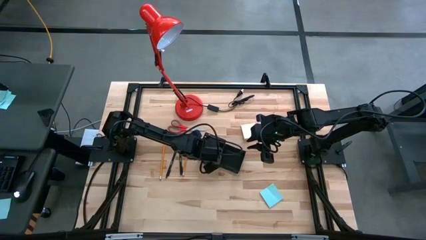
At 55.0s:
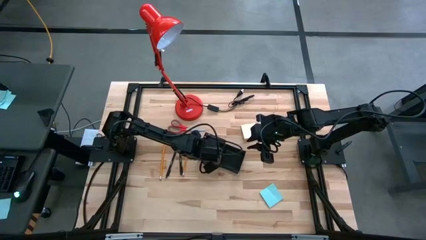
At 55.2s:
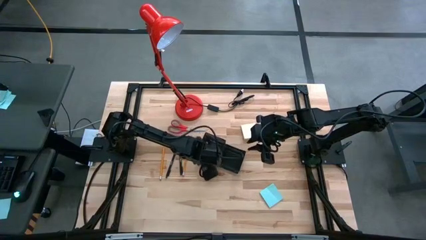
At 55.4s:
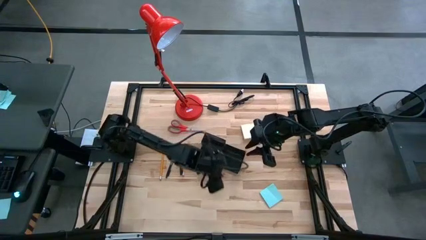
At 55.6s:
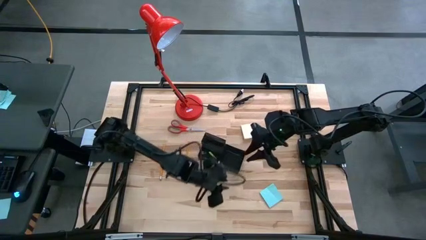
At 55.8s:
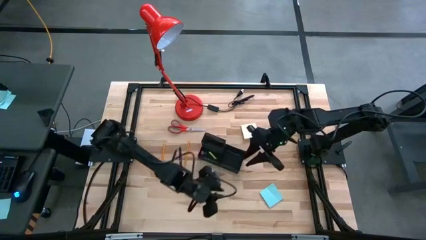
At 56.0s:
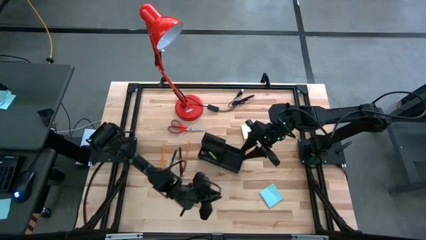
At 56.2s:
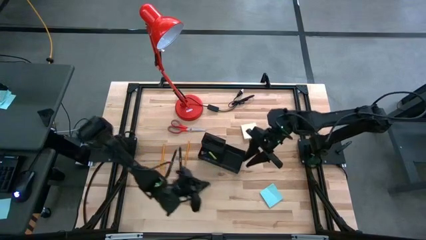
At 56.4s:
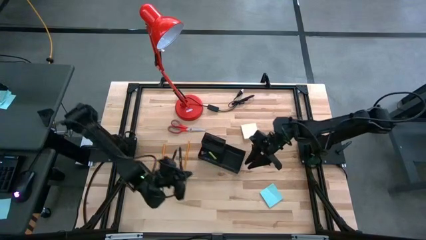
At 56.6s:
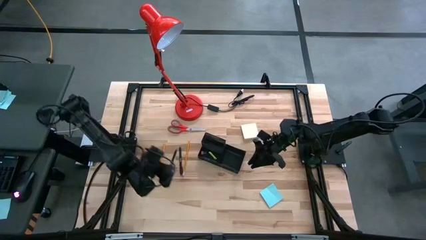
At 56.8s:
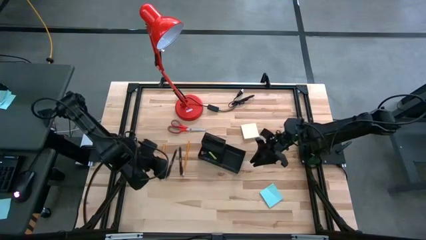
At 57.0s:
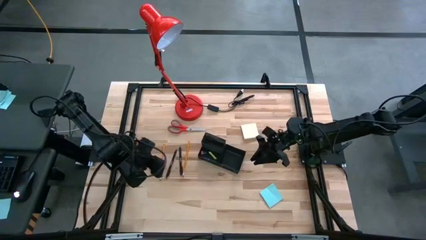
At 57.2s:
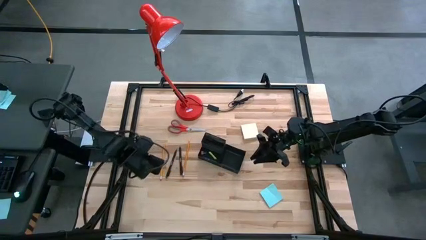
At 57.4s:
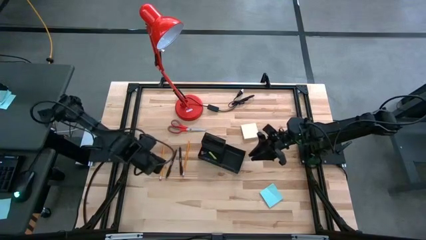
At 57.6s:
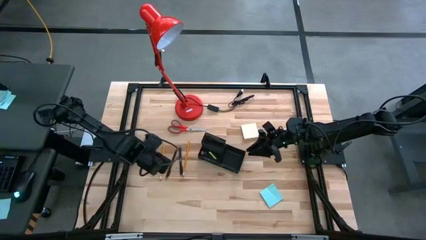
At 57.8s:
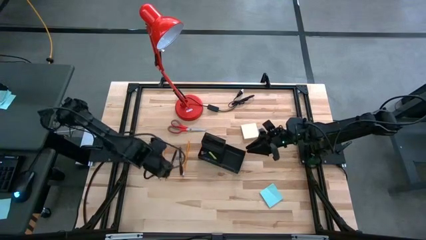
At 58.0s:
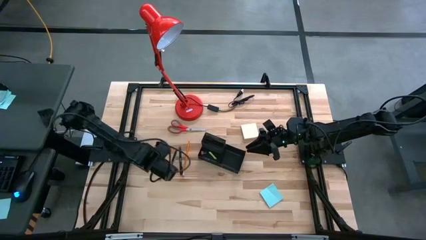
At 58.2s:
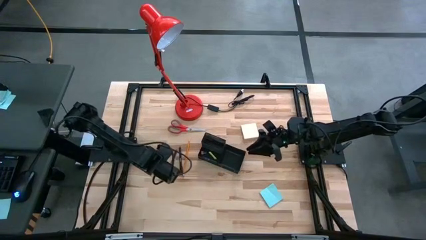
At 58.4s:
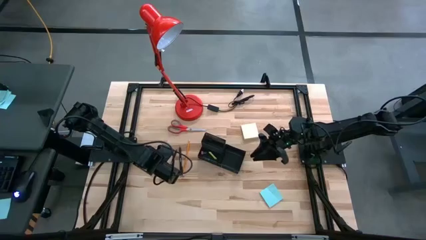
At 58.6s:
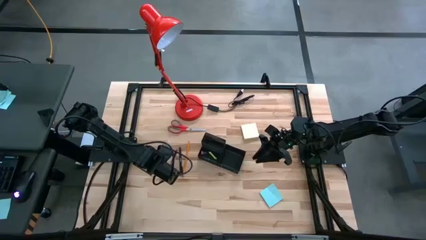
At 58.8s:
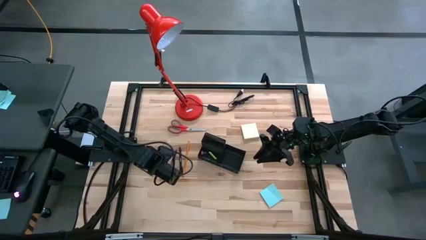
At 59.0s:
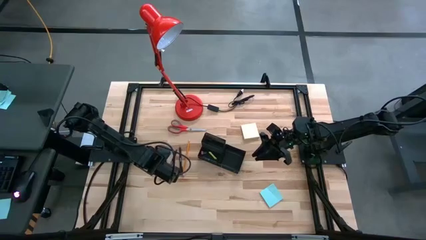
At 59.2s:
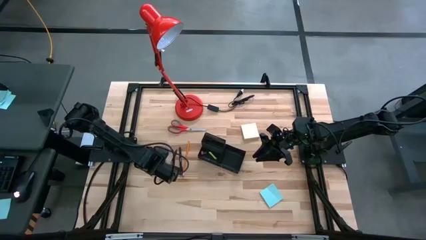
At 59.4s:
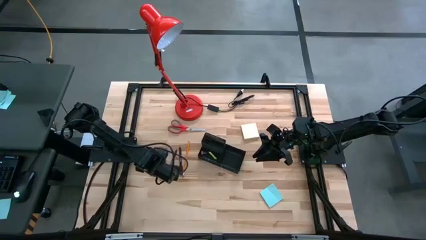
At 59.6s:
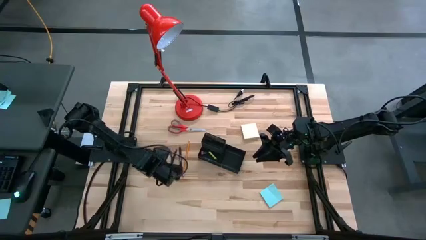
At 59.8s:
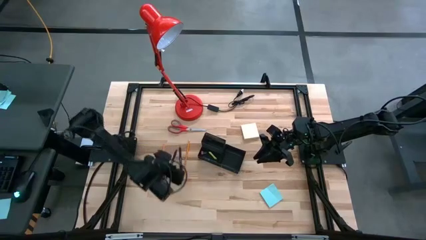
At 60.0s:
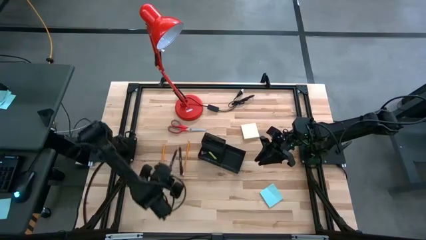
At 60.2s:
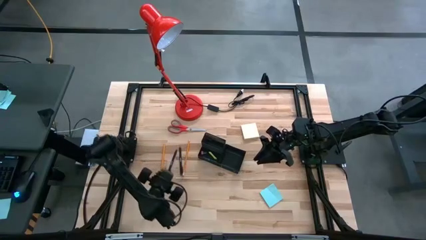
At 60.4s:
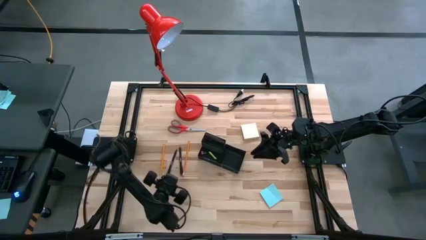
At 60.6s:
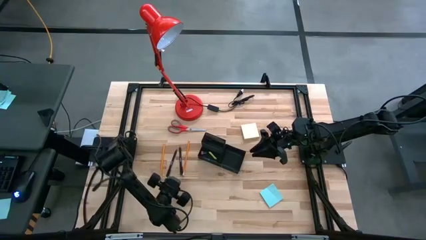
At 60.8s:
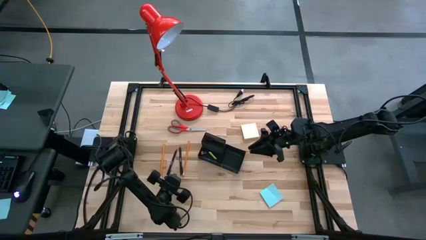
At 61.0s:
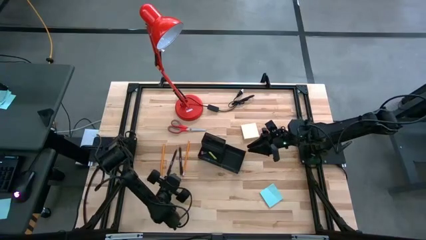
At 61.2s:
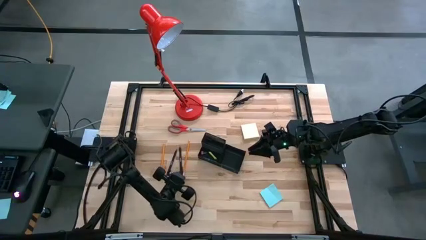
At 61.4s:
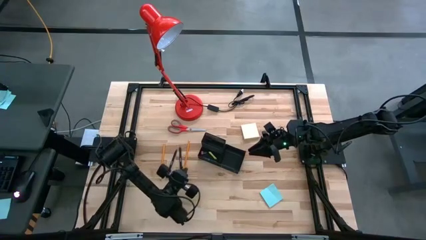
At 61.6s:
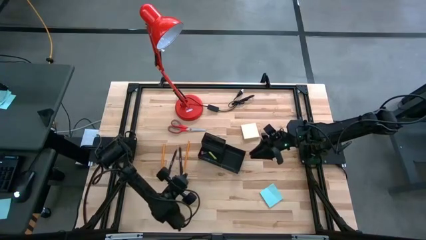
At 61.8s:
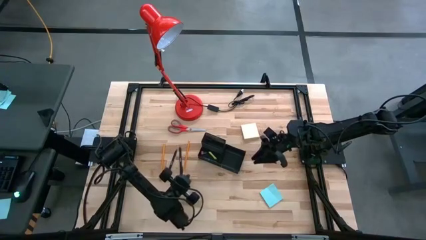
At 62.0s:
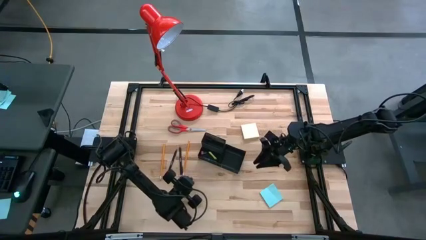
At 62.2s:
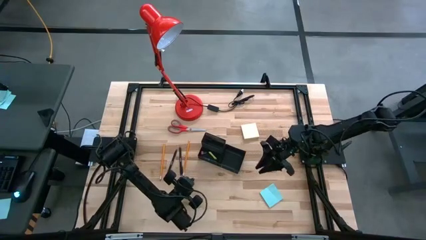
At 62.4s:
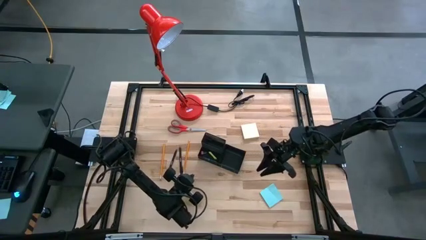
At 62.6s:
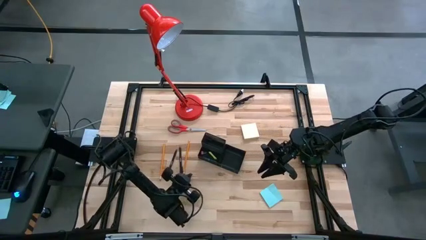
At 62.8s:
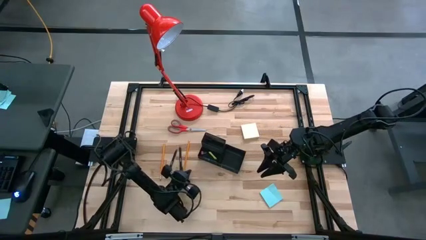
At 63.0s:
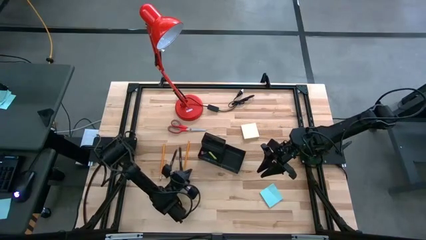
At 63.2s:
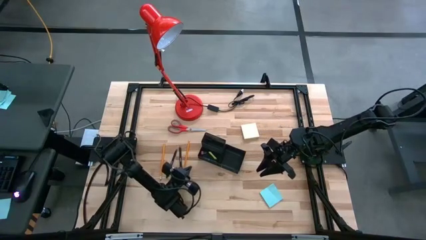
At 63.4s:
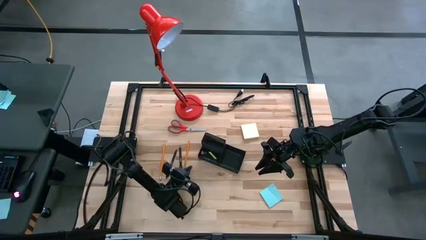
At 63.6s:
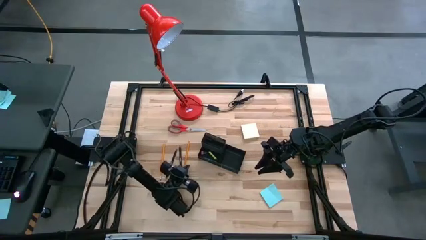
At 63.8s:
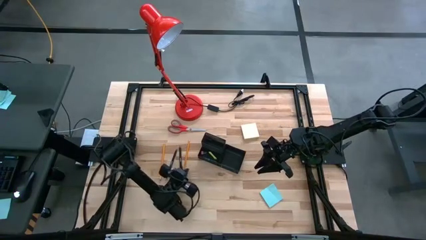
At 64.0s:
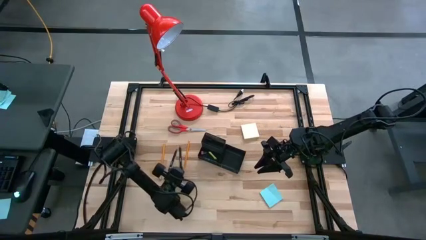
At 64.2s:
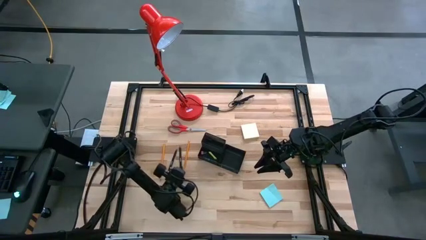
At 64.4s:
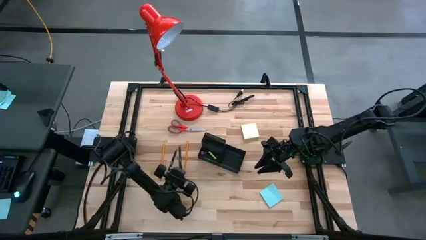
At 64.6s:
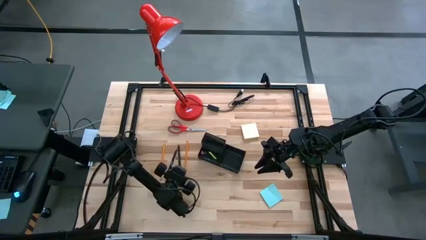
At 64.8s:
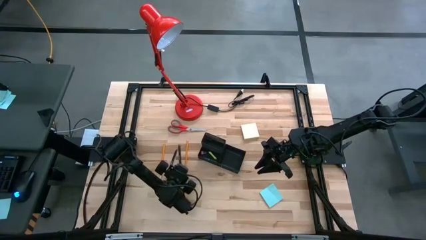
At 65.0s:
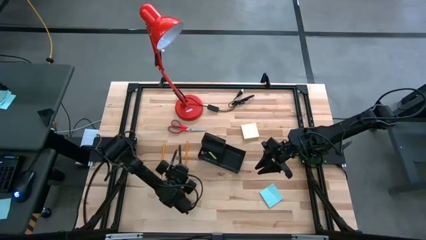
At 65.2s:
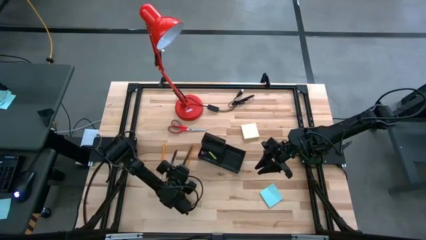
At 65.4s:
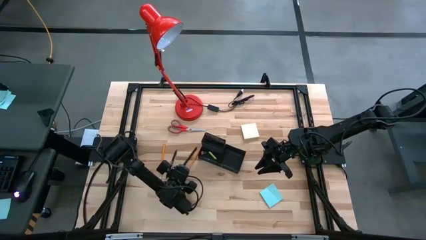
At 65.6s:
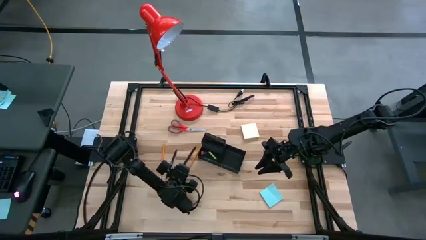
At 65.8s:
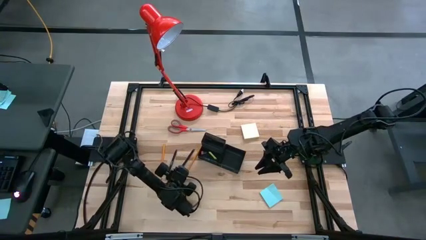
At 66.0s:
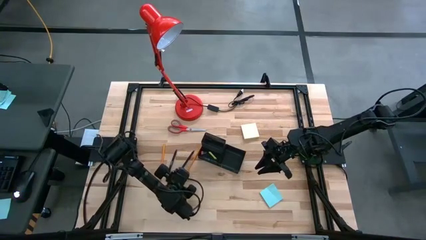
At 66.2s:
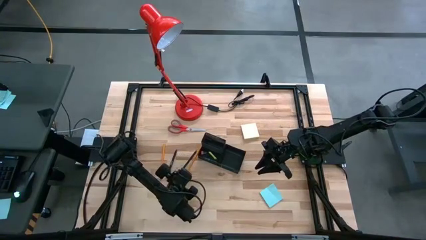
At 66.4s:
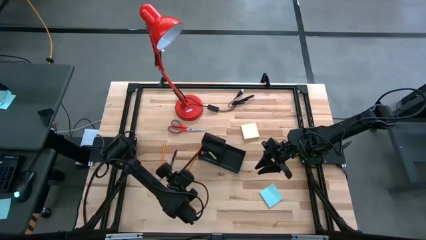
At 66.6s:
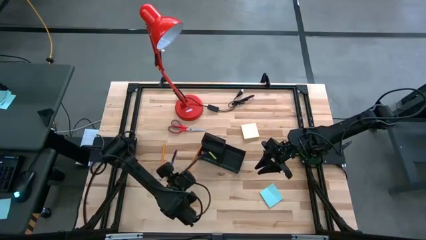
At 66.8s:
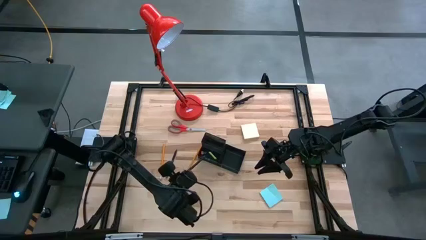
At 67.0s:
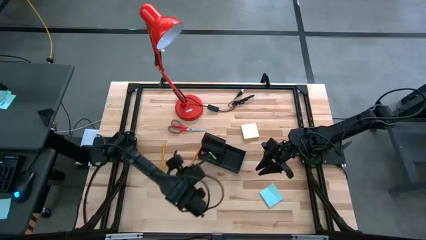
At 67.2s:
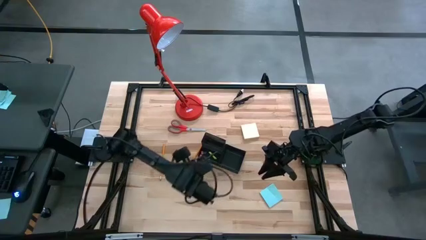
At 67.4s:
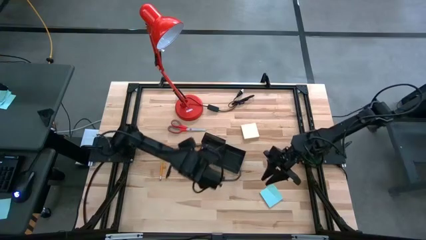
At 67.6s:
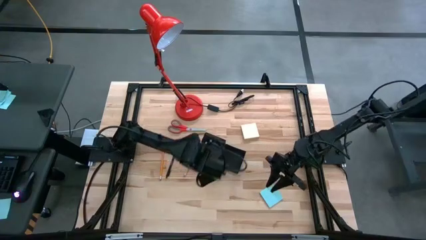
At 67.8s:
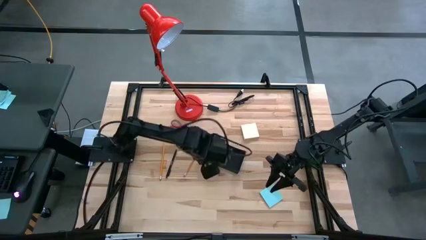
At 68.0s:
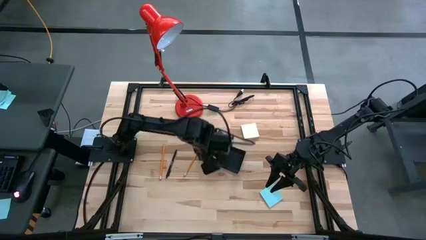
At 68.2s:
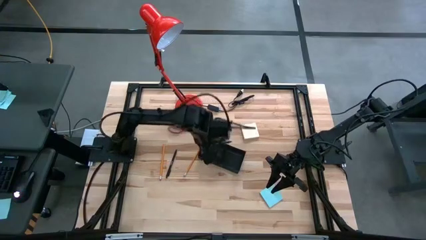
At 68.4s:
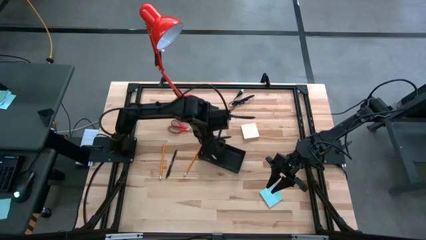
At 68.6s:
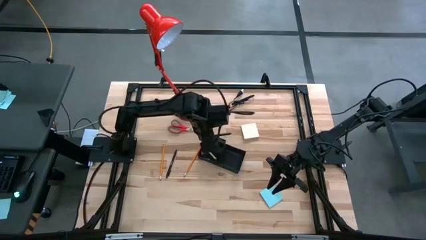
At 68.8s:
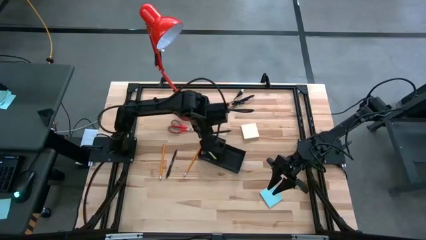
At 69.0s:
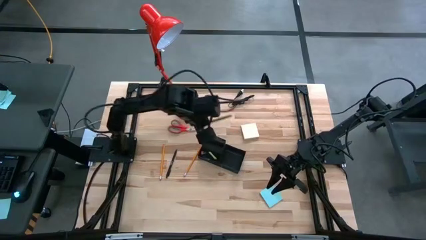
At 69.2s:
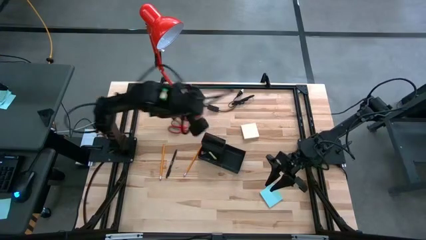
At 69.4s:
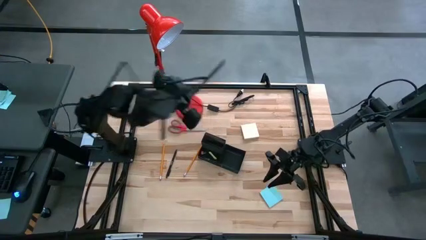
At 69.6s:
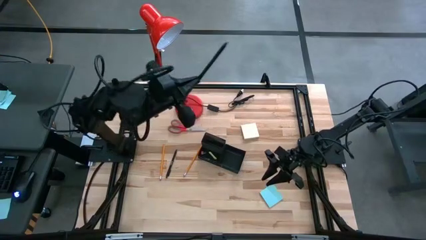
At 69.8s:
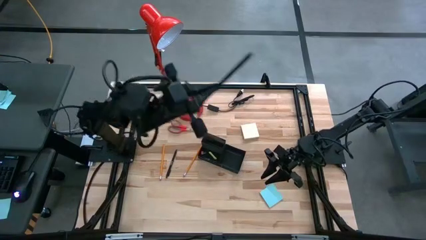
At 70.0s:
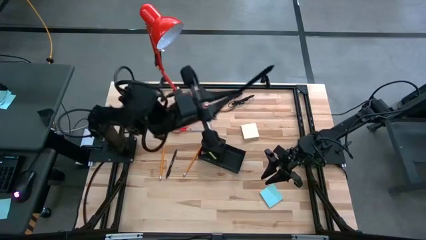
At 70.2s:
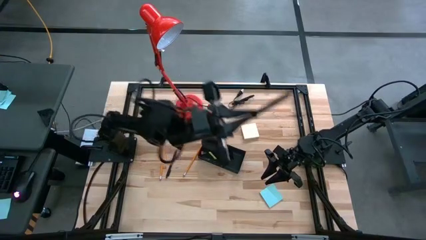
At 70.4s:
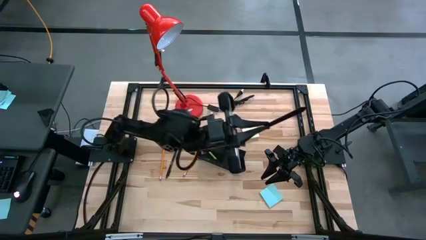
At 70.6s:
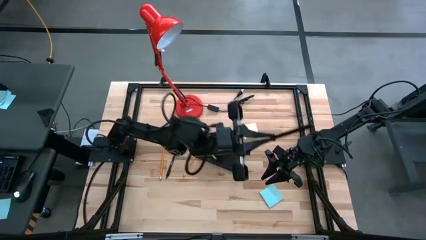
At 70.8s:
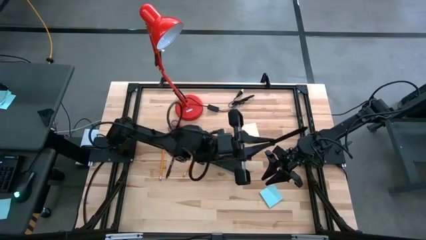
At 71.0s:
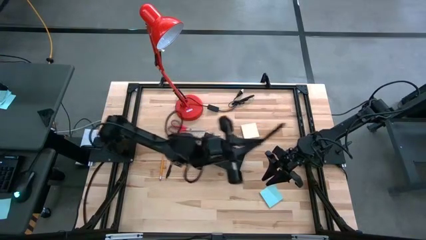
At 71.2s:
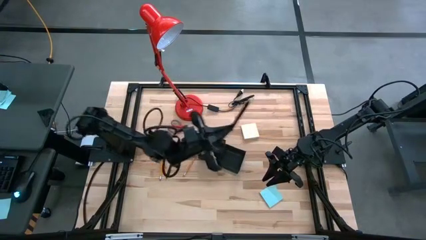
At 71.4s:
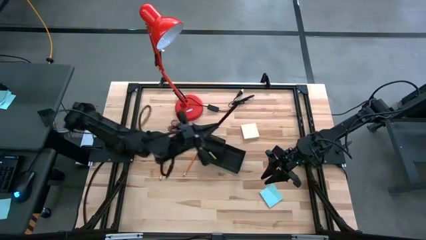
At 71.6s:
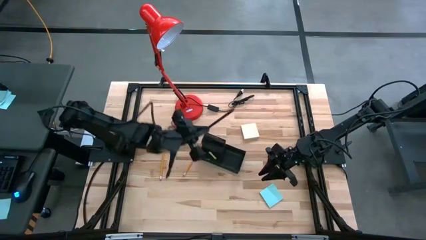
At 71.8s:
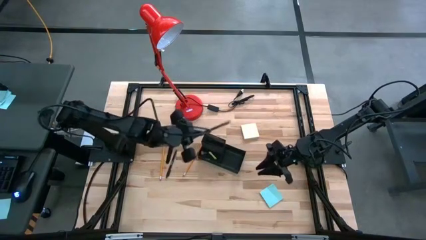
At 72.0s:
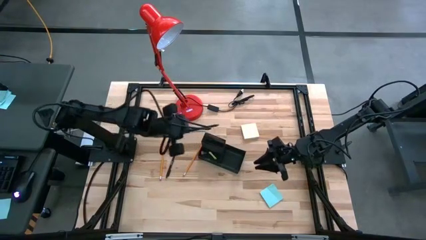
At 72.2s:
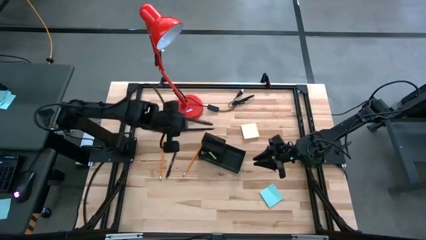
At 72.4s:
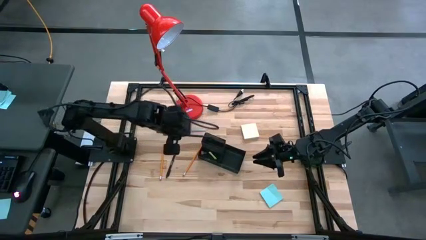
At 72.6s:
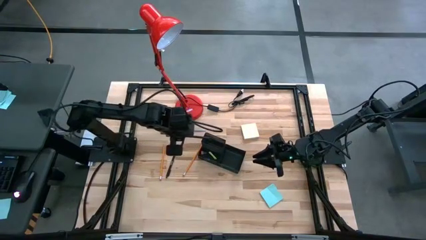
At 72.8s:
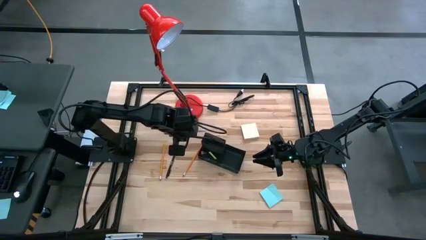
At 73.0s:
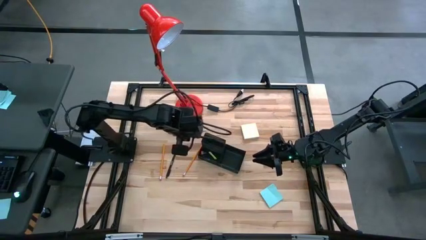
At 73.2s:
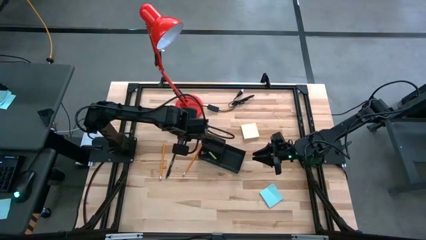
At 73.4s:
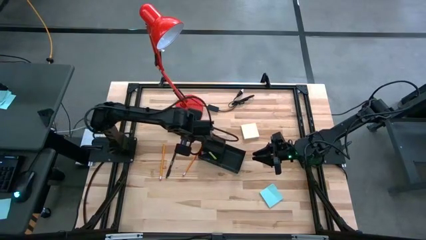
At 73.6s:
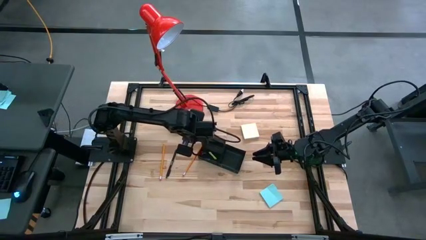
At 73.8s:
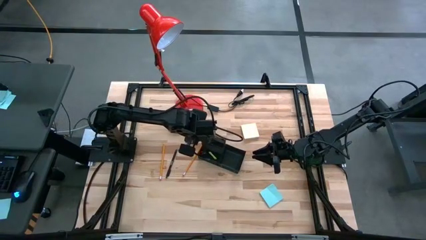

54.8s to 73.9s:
Task: Pick and place office supplies into organizer
Put the right black pen into the black desk organizer
